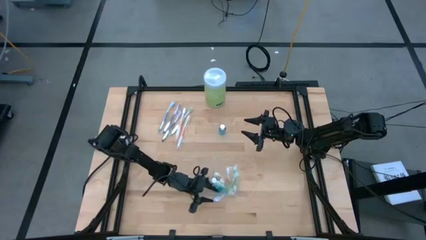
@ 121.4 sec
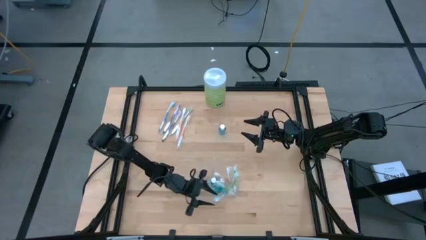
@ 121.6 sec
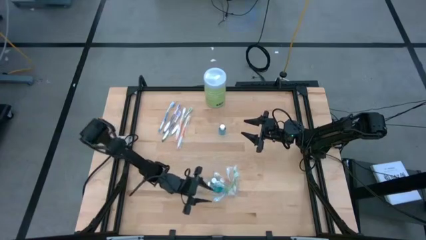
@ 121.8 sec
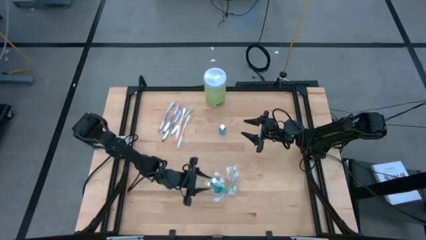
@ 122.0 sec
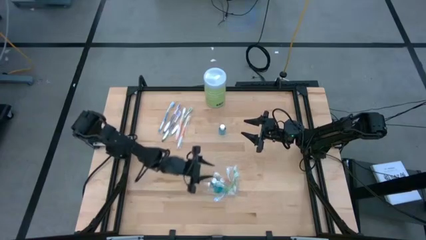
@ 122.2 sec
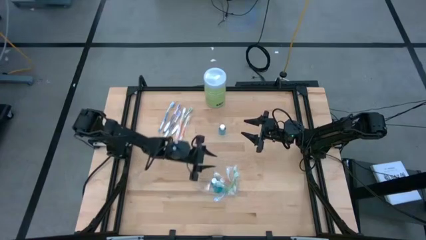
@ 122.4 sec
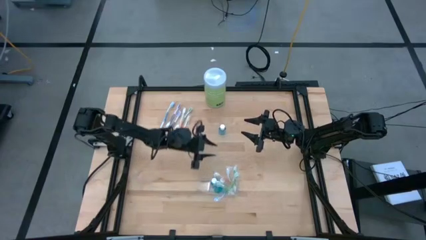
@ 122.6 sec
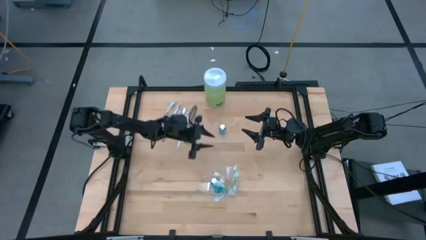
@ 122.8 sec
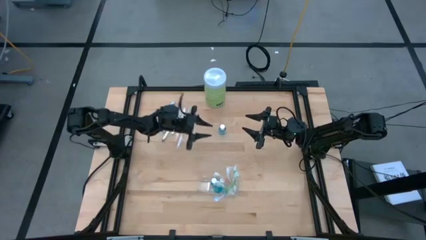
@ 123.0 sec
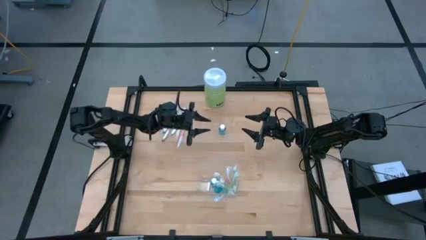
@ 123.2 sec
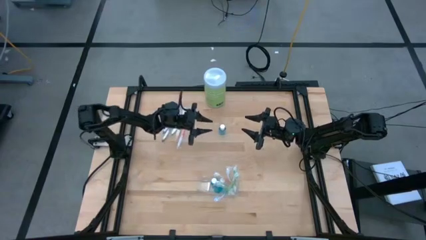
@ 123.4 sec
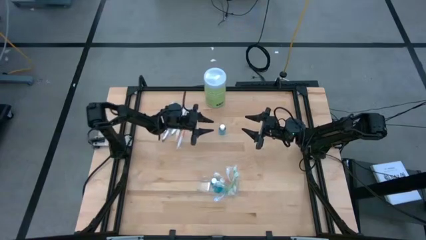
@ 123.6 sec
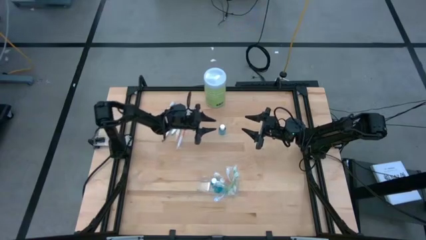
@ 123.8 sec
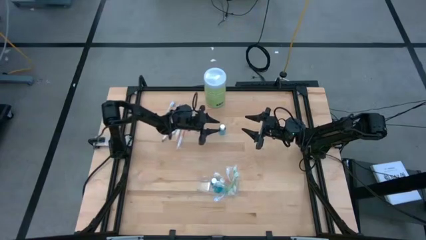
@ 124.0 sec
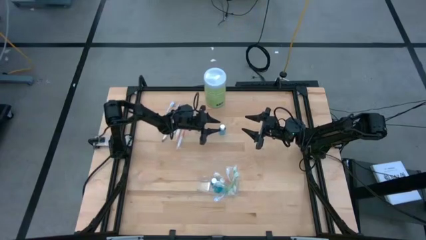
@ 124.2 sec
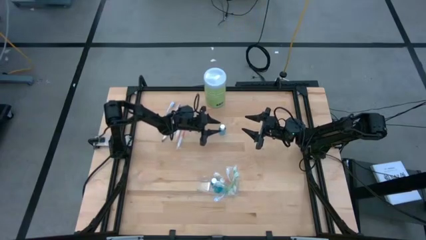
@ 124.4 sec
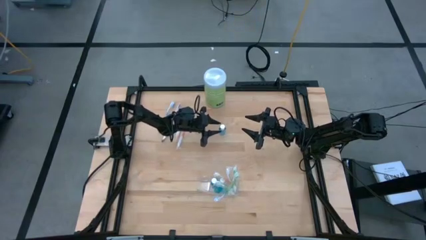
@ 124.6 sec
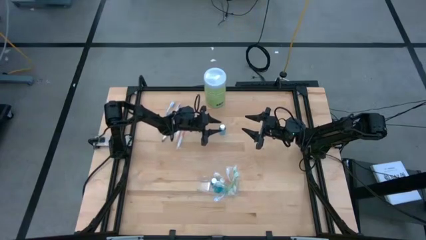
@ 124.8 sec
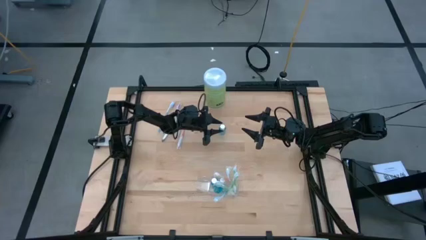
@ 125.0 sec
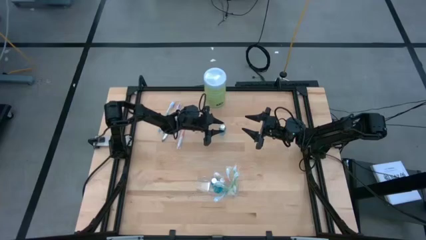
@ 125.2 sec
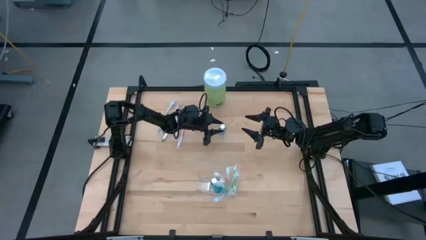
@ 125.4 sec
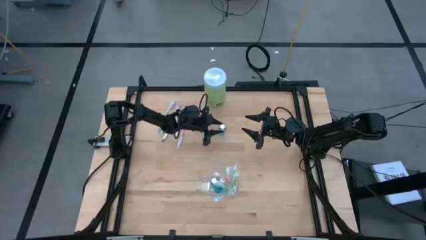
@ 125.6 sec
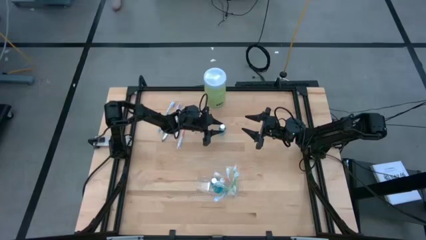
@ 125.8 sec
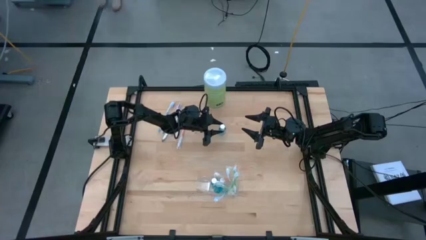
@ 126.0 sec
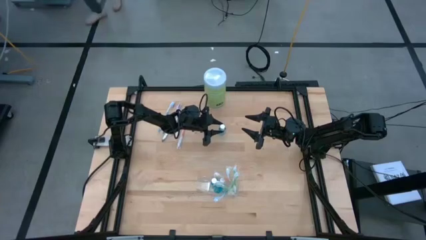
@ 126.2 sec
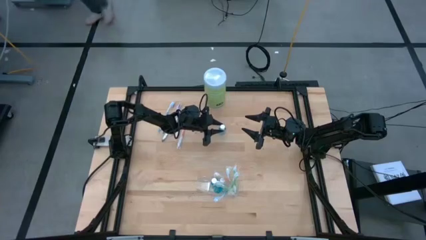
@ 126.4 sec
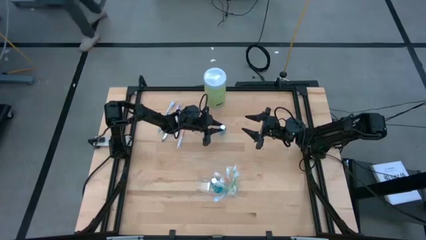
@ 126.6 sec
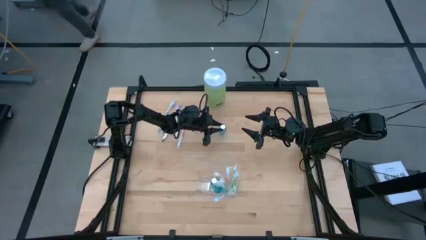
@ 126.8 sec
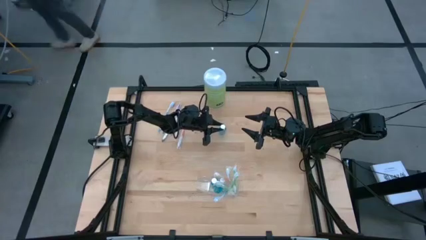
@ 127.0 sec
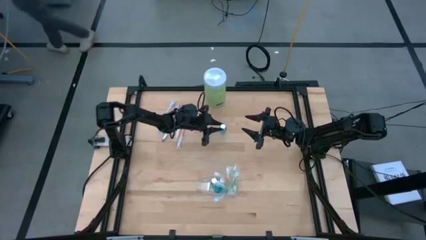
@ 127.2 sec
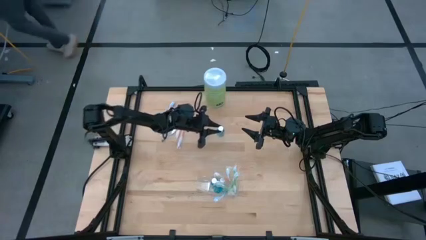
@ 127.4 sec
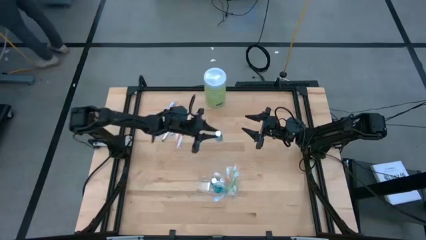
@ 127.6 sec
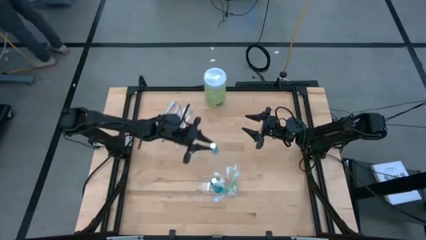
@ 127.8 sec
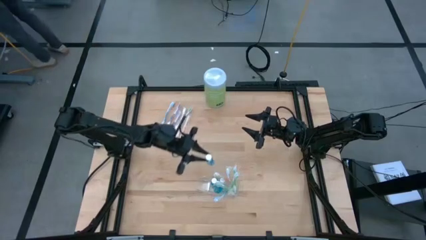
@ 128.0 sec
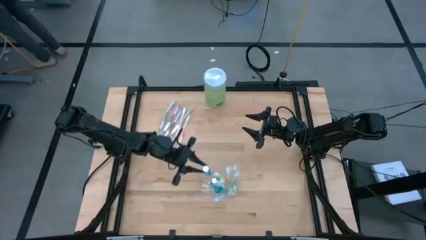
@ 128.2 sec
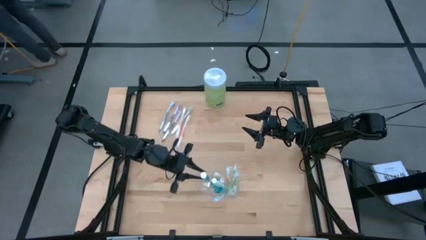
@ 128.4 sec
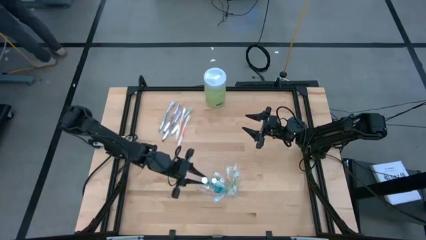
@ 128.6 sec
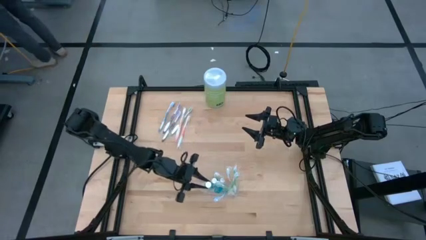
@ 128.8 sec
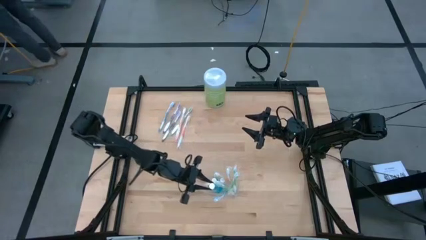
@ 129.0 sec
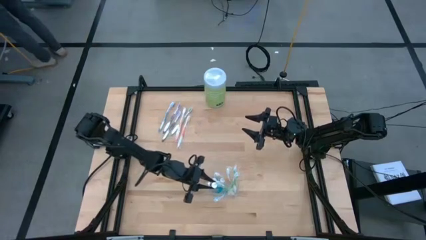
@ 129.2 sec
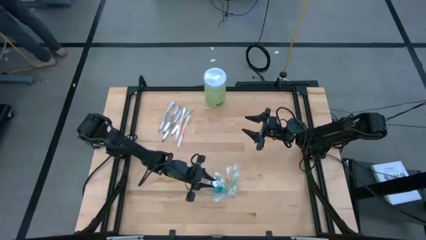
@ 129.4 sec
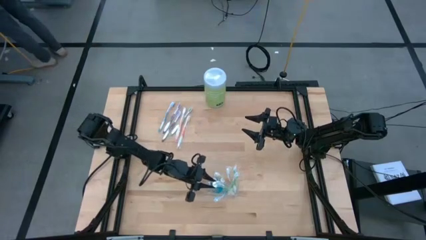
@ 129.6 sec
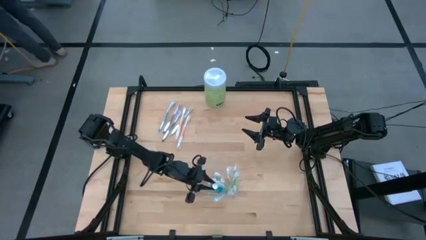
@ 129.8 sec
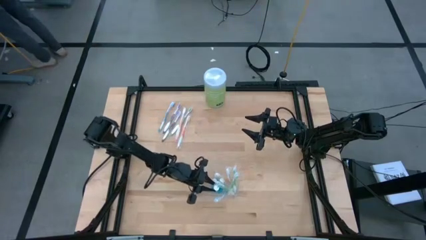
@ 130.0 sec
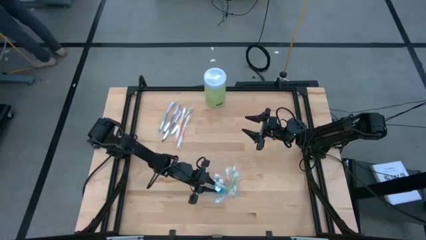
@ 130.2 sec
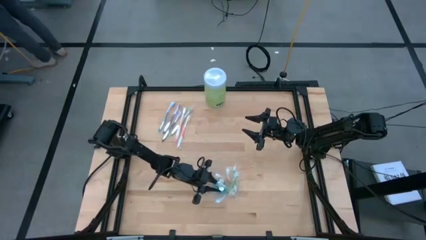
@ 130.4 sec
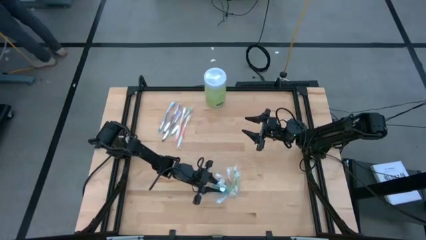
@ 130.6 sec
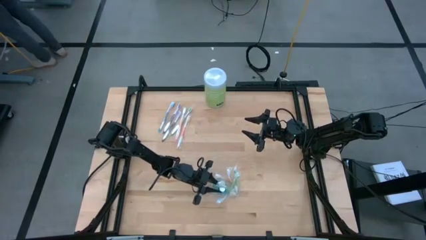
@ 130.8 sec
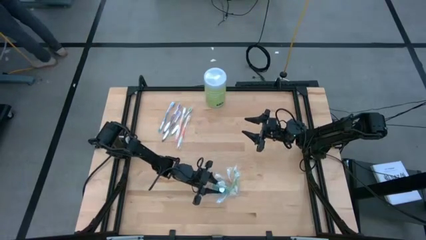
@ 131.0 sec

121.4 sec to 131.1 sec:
Task: Pick & Place toothbrushing station
Put the mouthwash into the transparent organizer

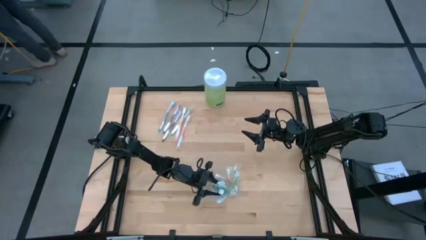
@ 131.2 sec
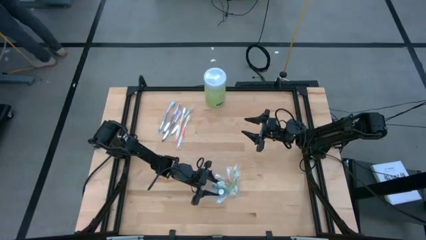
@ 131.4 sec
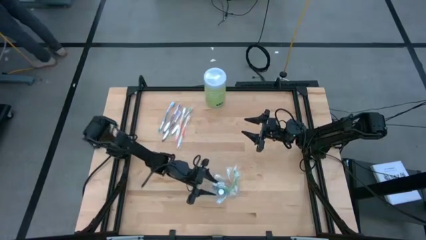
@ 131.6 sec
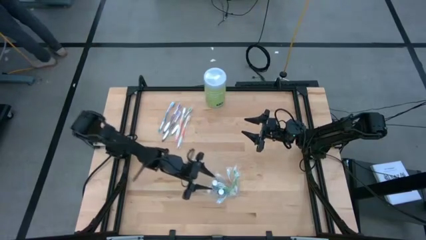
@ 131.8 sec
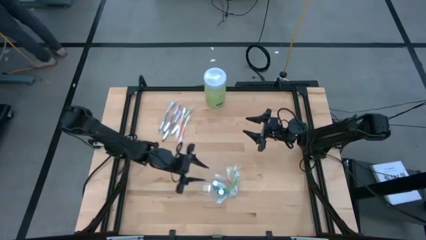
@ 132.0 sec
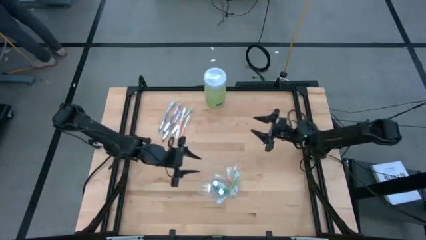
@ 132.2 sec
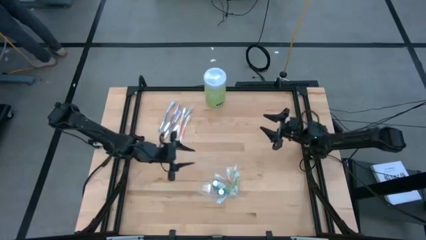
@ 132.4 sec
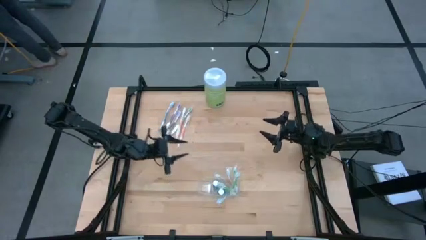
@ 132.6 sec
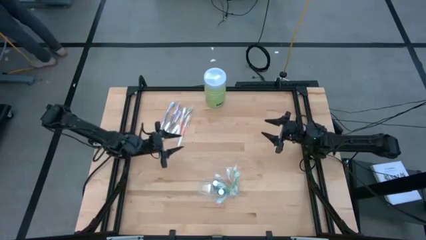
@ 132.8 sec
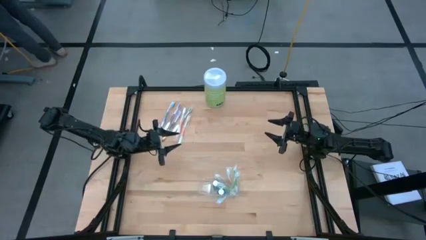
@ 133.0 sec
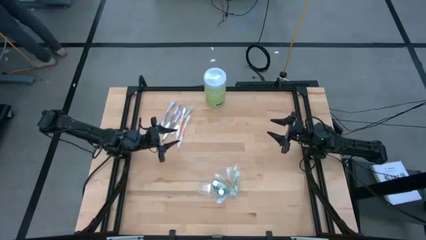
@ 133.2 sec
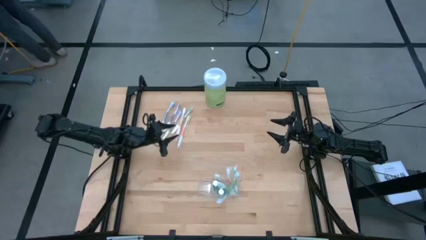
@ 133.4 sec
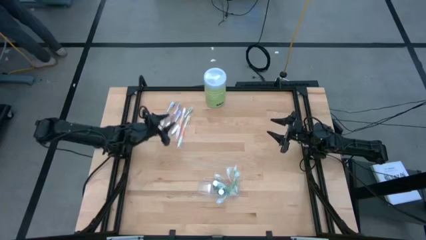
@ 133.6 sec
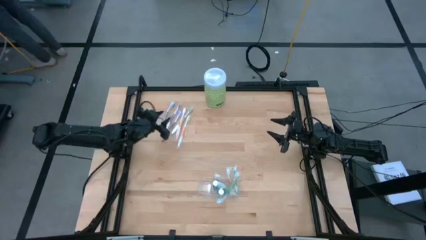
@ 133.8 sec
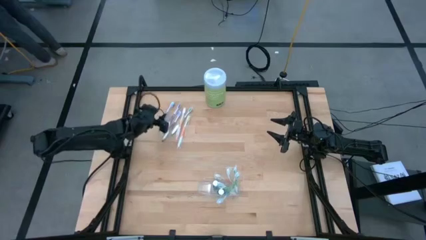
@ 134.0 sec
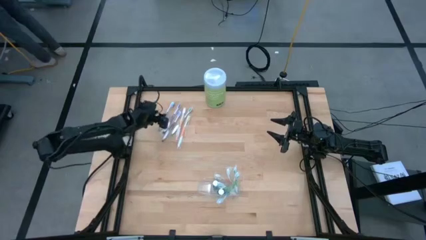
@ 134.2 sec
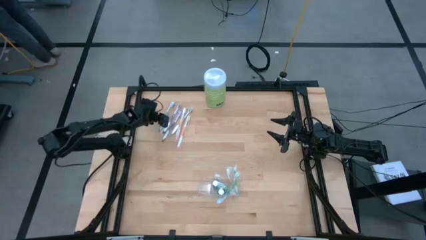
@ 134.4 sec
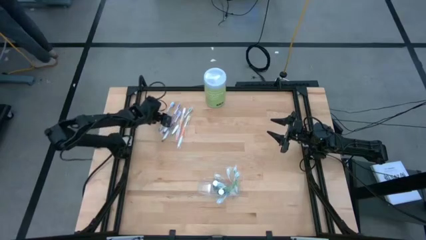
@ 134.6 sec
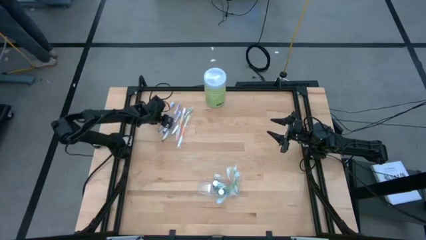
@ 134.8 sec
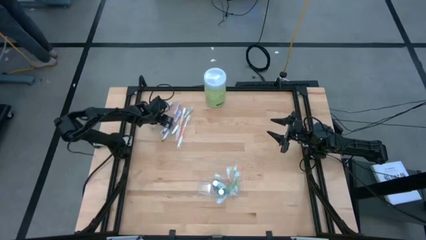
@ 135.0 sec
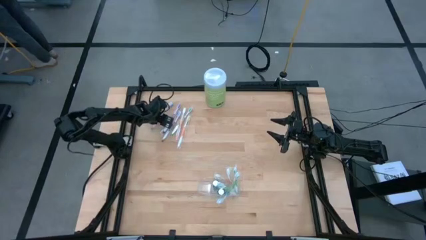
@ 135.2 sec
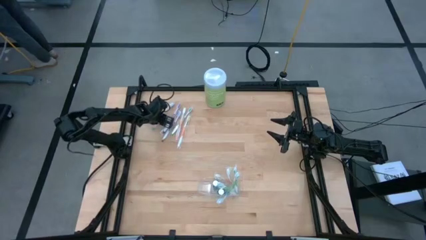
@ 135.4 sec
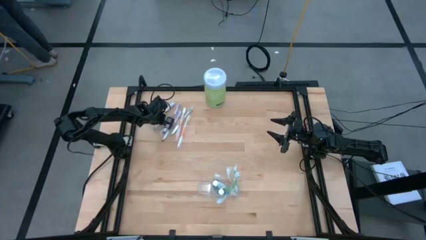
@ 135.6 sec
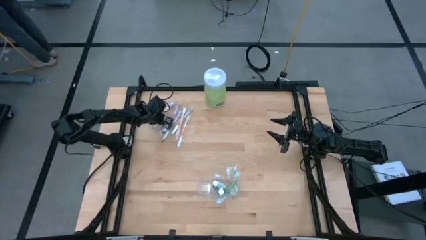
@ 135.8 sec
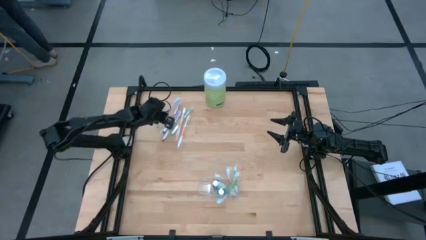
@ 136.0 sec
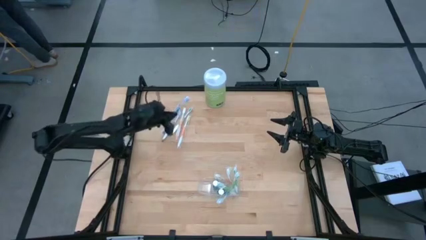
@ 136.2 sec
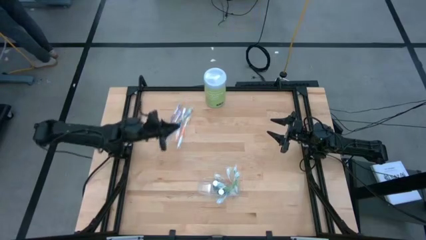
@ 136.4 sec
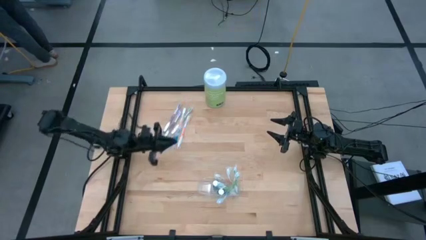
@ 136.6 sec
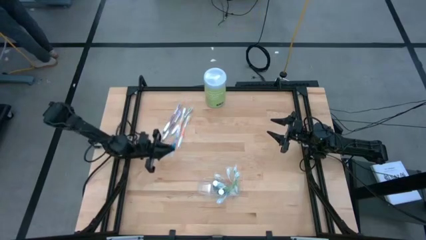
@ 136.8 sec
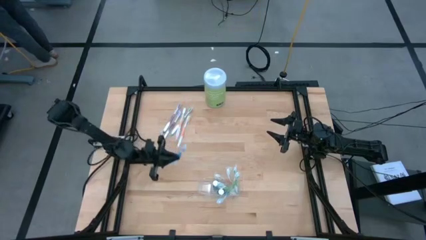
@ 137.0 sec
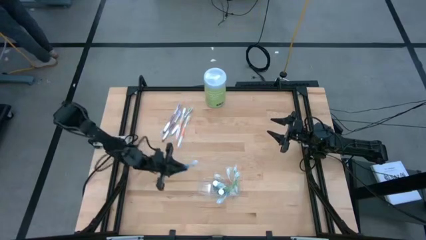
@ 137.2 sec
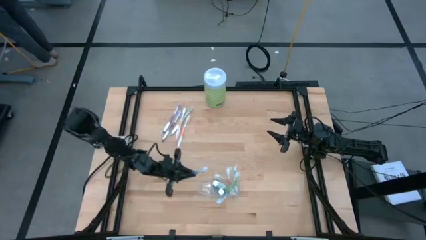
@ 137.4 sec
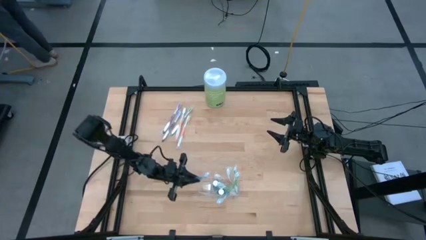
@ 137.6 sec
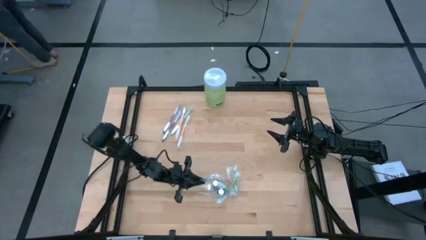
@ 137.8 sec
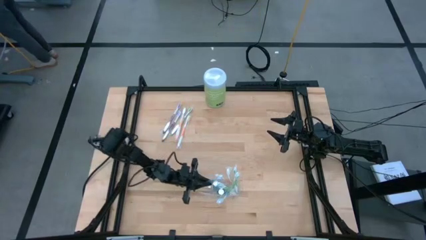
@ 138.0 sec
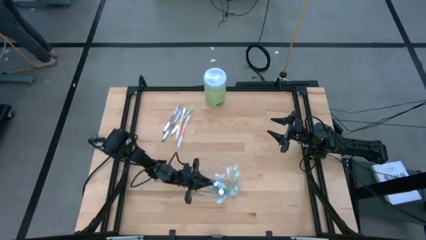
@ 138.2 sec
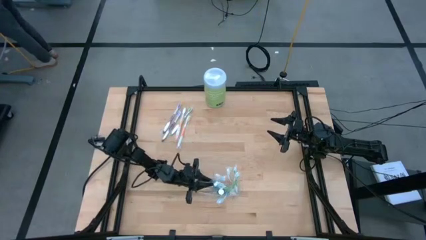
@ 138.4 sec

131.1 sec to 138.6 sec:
Put the blue toothbrush into the transparent organizer
